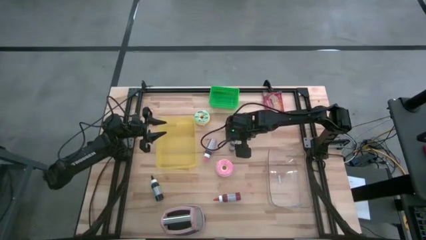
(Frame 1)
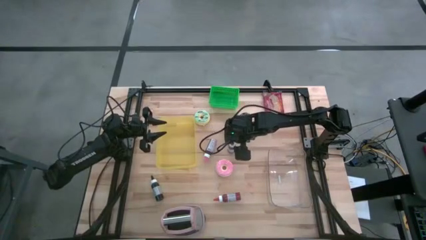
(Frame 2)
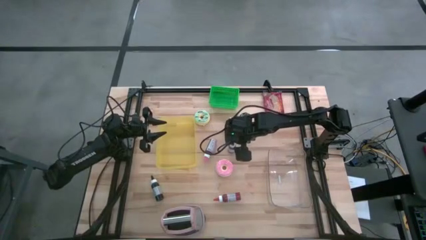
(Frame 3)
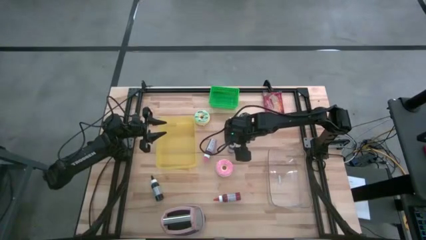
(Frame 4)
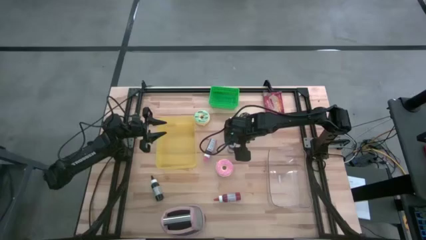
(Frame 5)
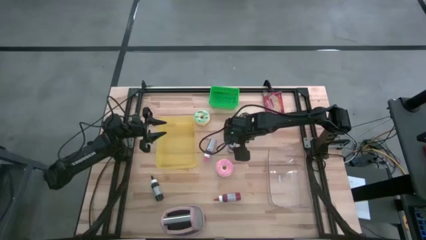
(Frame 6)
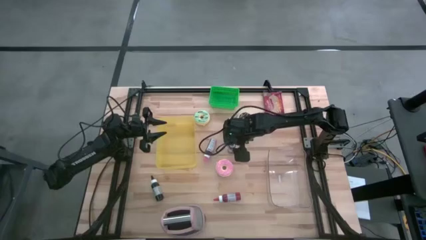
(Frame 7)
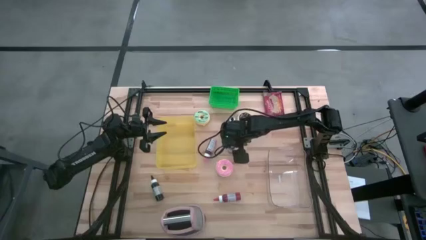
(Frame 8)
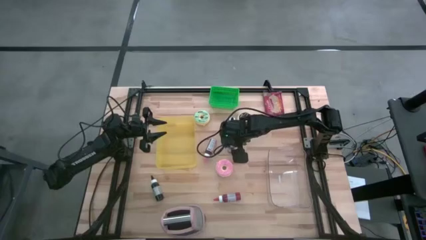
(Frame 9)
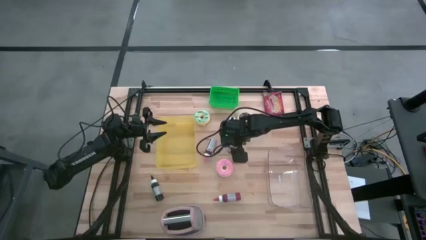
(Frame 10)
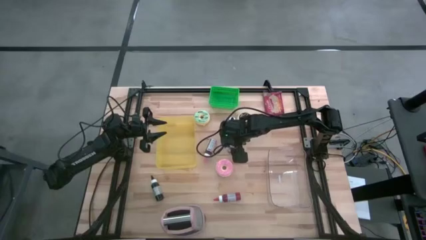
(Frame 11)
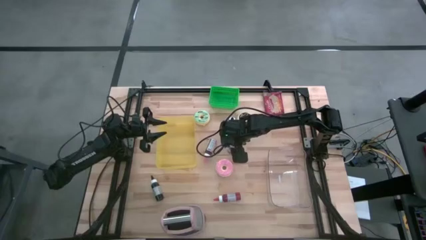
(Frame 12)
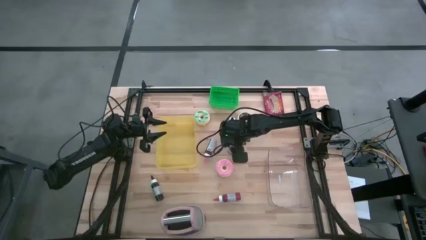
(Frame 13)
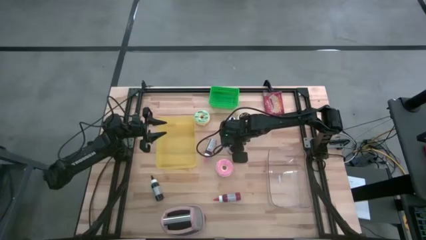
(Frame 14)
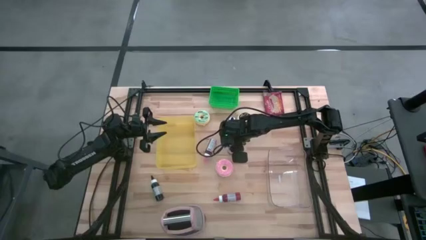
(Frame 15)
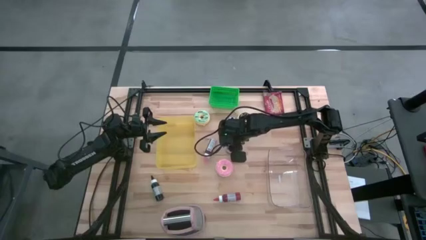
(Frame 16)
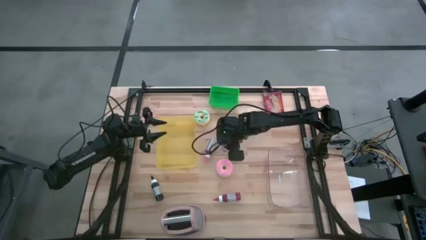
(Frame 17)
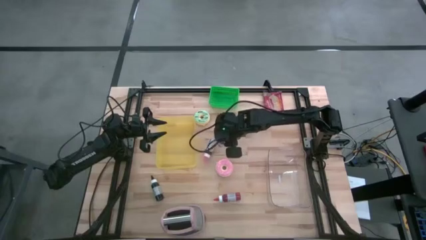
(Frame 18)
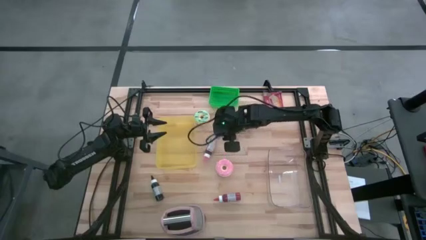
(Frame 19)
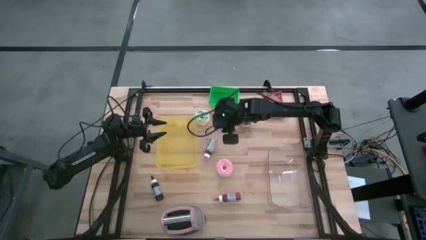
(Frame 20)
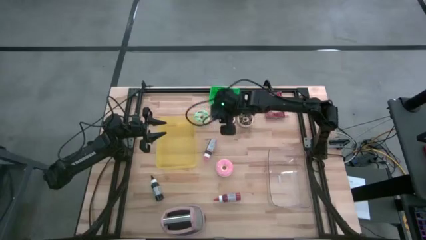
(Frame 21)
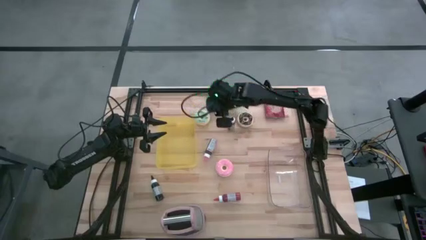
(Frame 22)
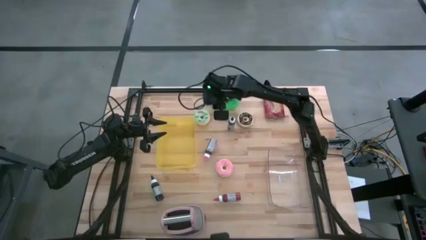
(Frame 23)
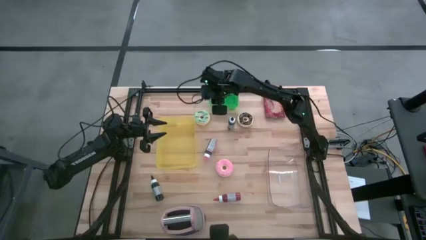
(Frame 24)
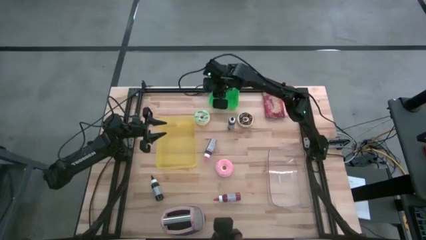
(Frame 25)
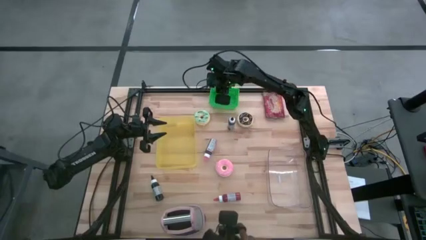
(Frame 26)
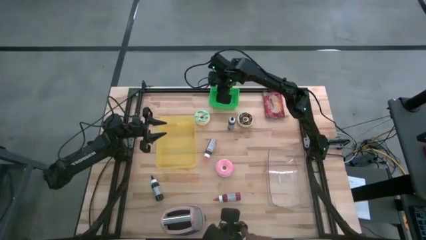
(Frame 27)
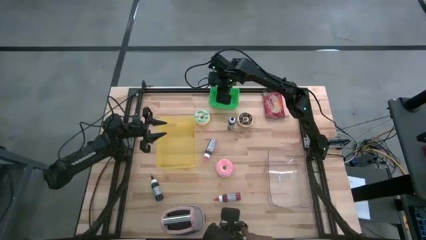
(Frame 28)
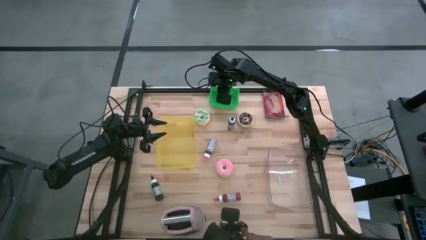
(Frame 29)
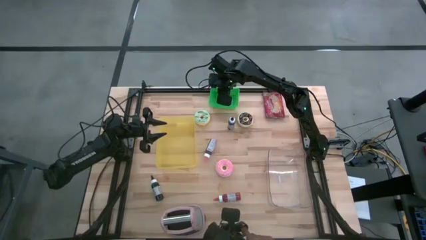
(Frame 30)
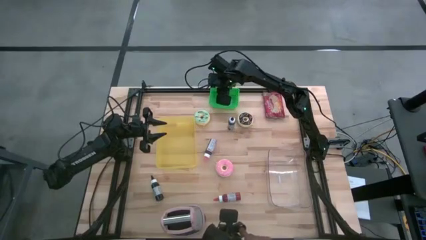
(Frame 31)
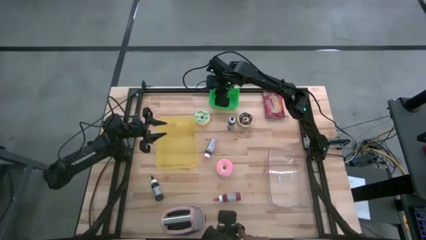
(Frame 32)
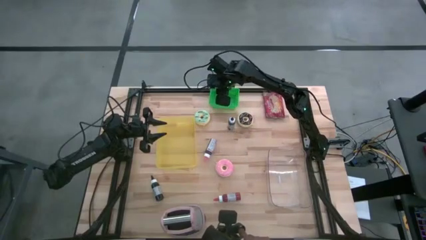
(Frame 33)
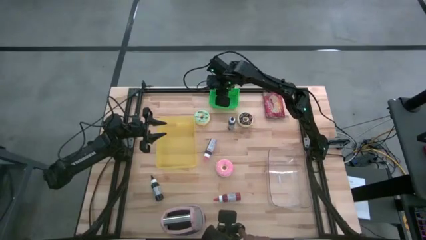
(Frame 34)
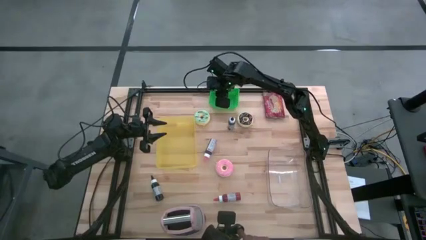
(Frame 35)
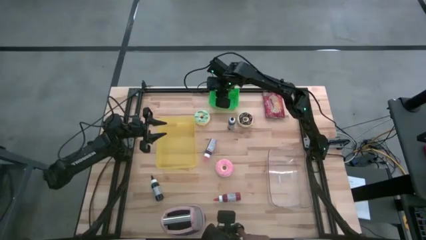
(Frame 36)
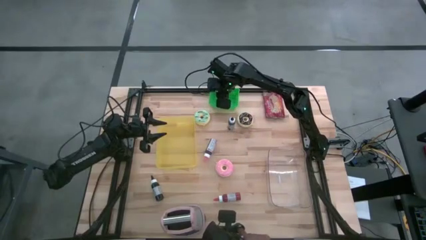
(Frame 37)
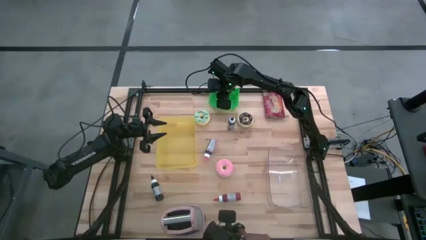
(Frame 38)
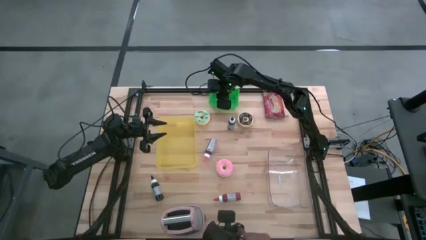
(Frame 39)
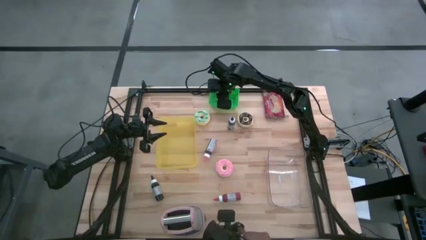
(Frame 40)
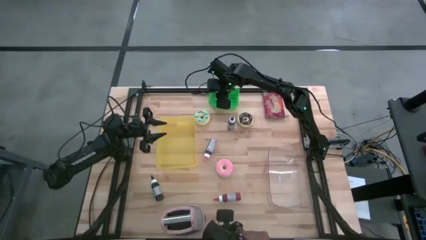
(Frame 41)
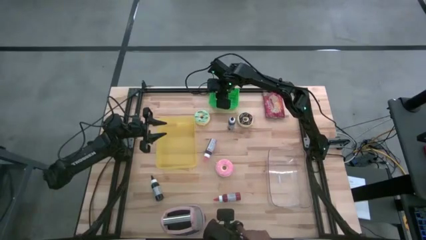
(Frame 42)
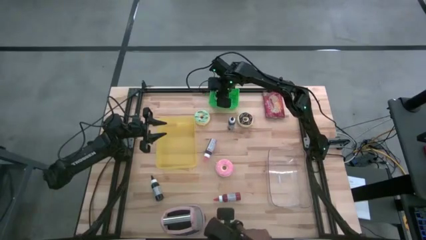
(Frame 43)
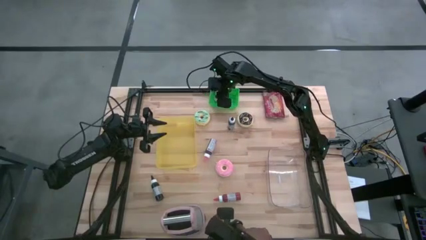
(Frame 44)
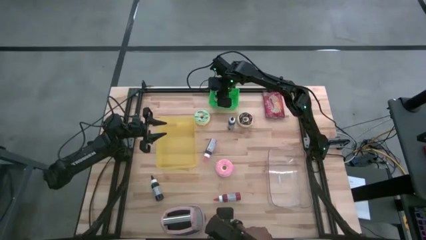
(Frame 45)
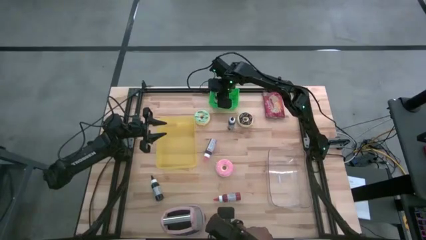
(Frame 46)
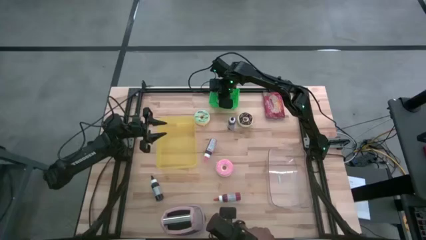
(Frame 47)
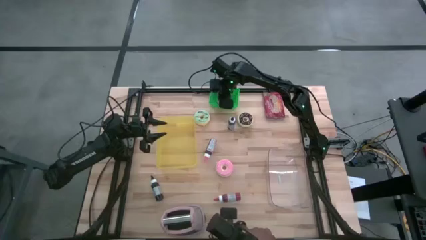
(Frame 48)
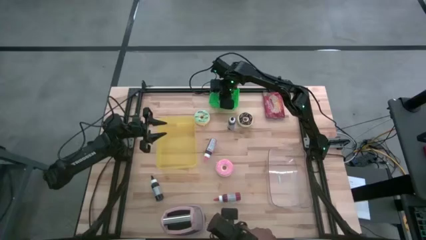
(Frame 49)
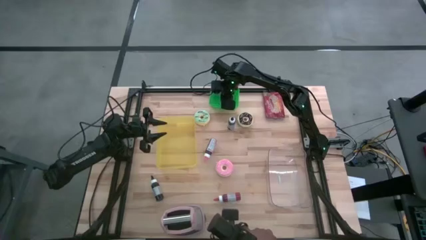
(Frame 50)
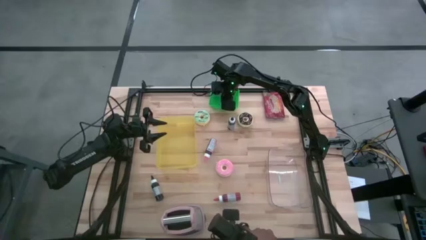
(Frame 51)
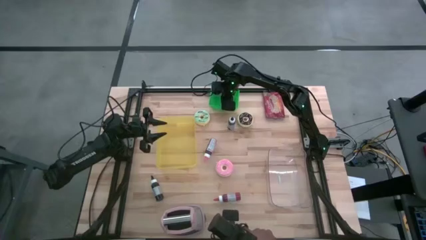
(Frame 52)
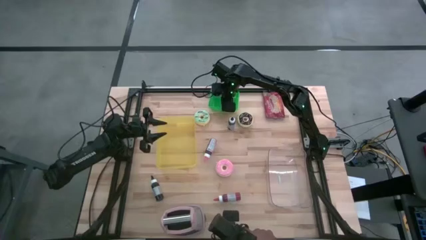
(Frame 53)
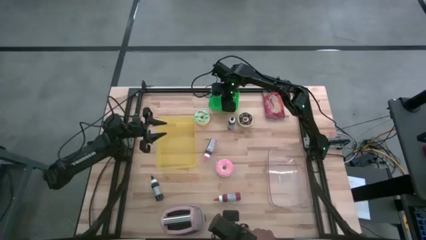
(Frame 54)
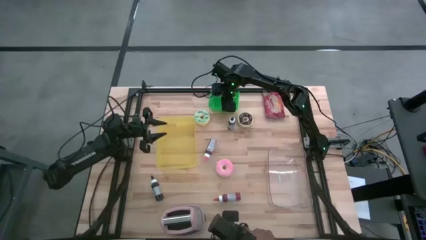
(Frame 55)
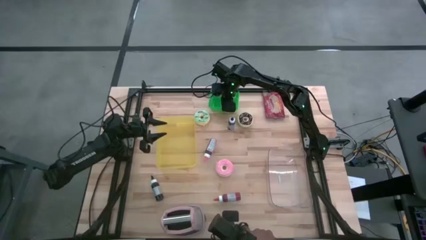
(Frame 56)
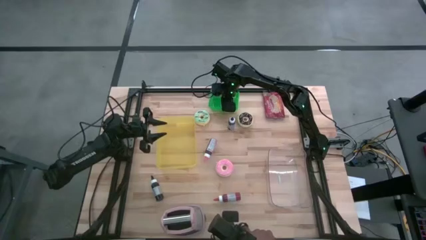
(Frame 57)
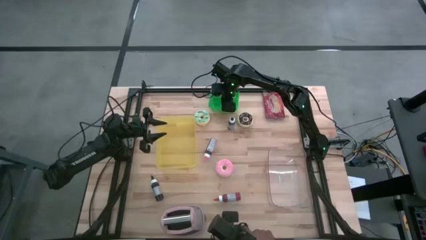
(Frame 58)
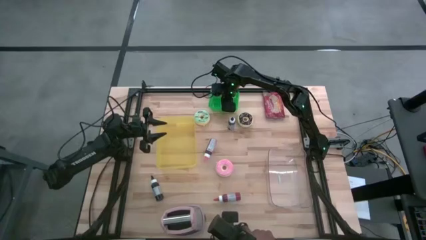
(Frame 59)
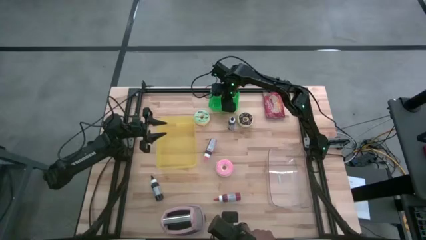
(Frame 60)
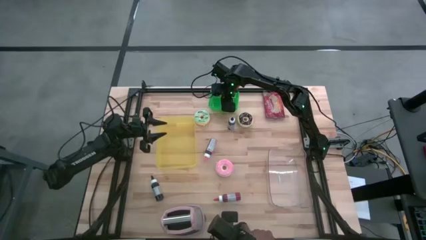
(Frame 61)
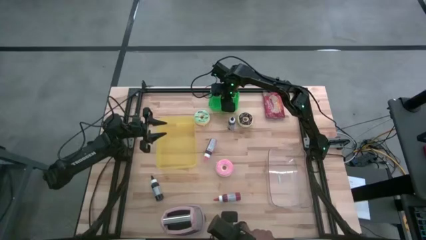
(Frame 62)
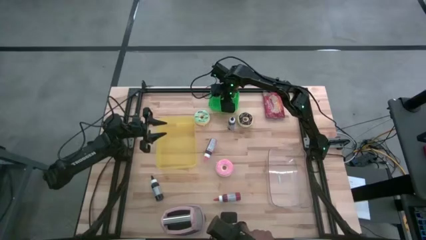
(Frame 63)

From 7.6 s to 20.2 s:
Task: Pick & Place Food Item
Put the purple food coloring bottle into the green bin
